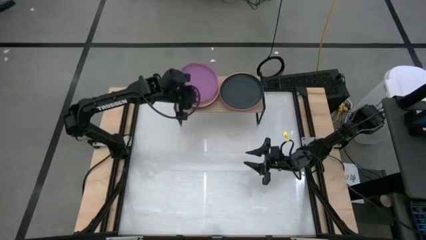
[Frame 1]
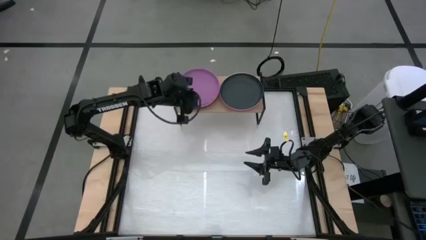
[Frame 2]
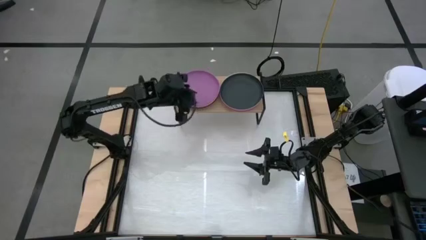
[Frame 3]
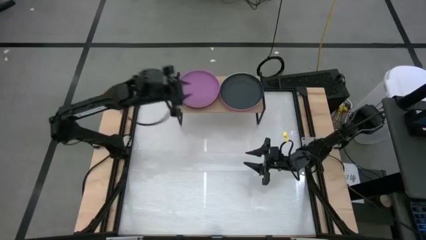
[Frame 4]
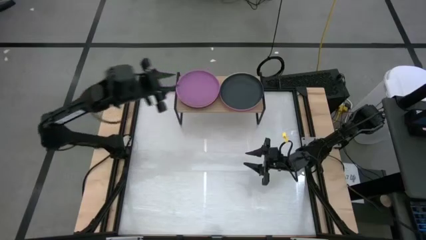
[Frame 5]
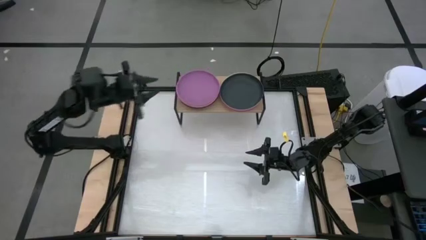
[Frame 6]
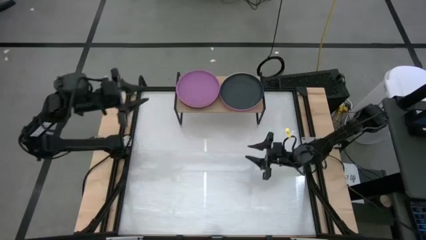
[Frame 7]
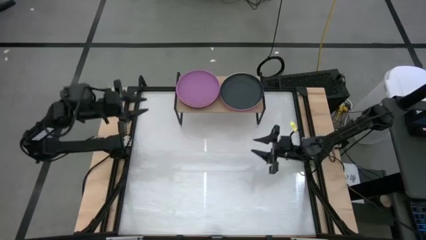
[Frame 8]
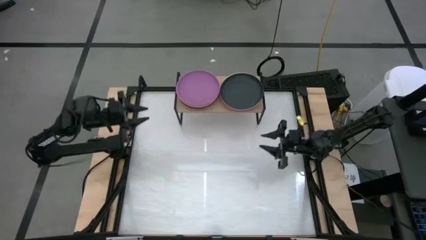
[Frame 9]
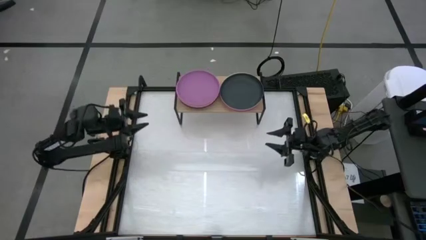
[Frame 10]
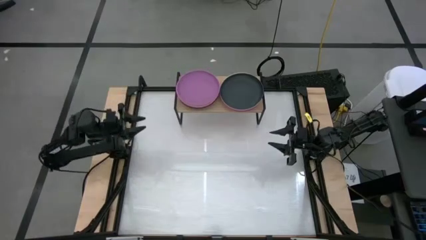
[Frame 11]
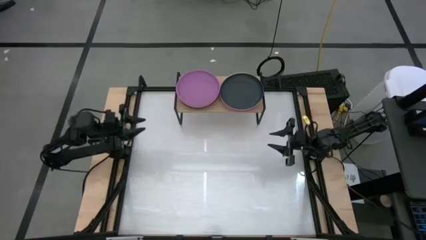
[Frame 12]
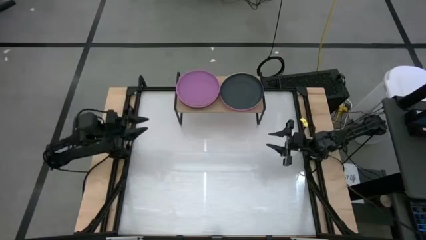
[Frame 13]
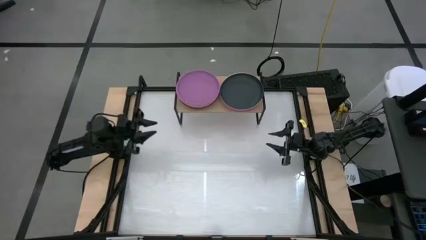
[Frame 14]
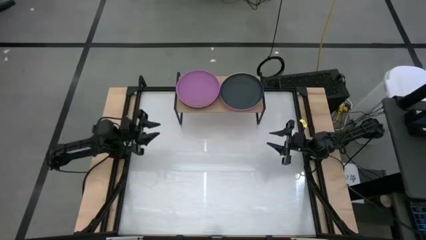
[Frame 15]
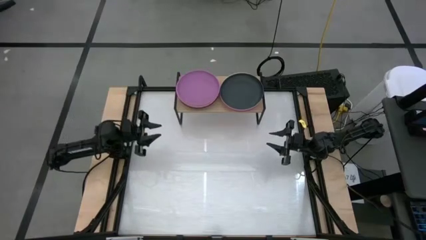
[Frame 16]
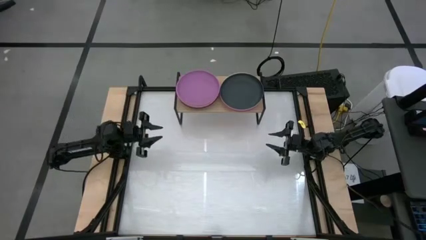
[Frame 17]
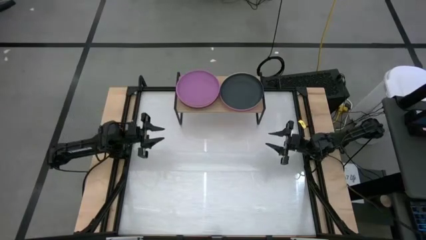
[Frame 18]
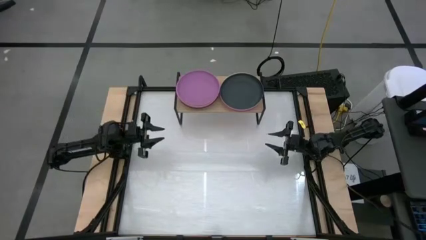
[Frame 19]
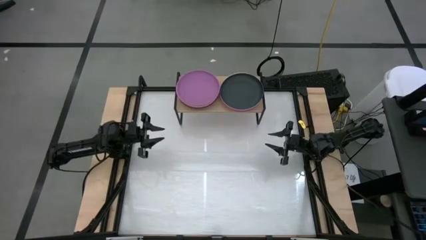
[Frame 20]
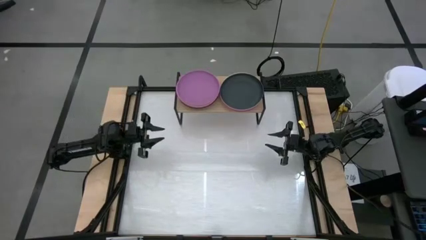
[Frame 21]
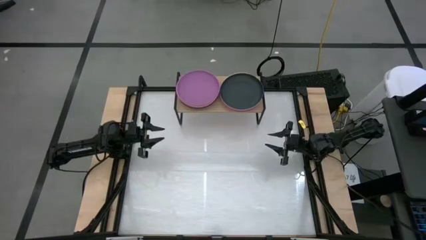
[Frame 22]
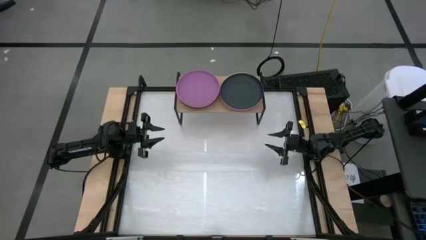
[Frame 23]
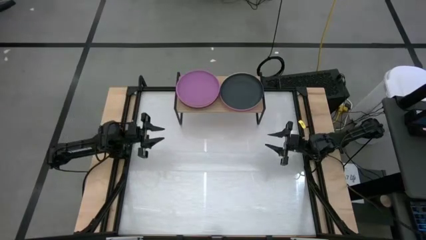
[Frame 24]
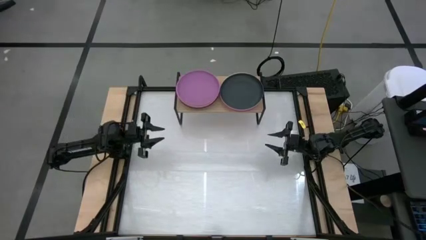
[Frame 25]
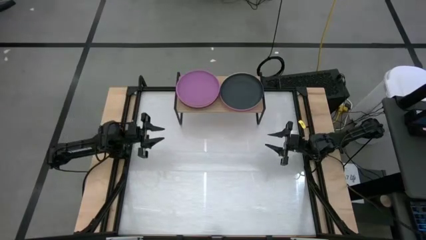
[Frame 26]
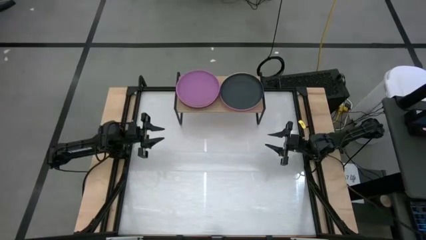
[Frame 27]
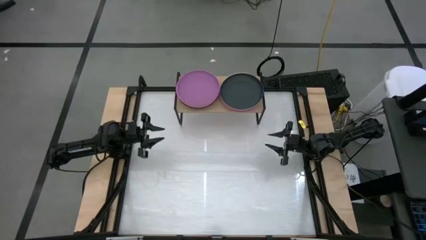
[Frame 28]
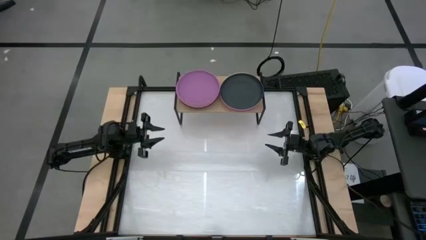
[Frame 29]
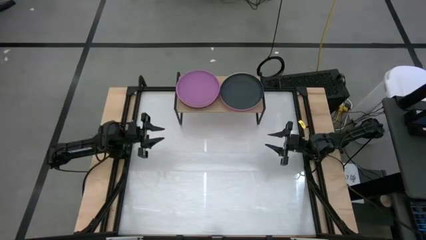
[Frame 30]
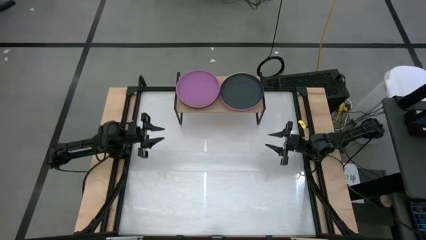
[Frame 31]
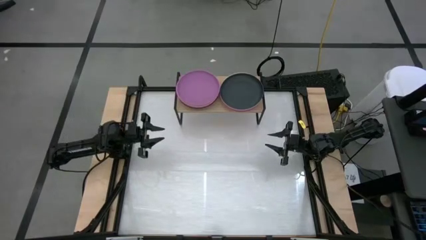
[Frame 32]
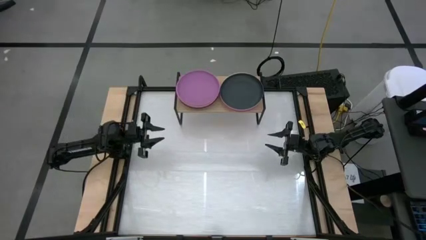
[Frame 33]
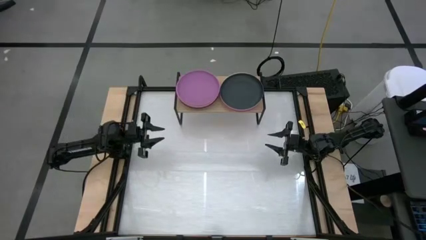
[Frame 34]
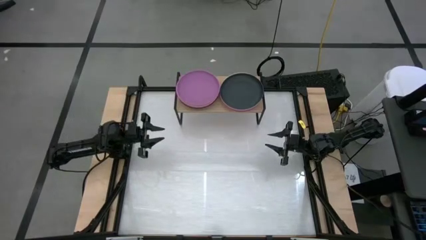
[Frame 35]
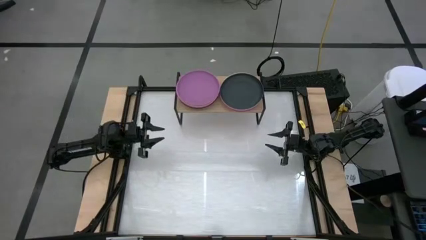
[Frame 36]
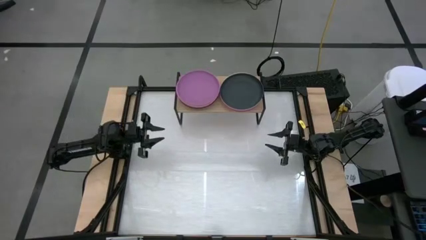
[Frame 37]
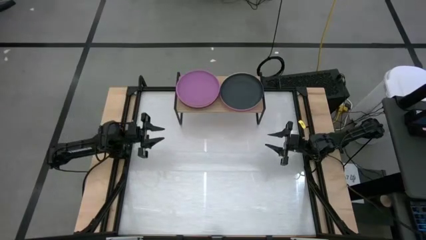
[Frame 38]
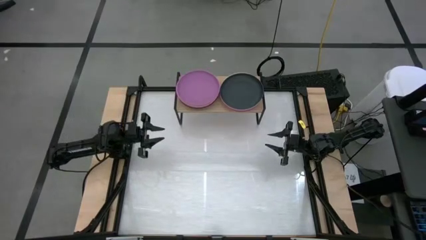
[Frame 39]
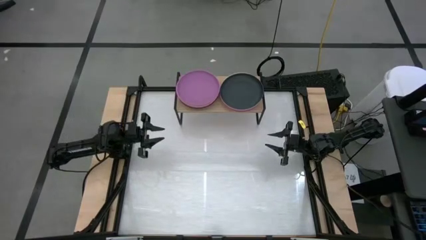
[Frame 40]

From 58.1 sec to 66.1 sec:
Task: Place and stack plates onto a shelf
Return to Home Position

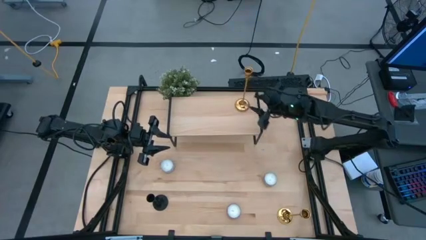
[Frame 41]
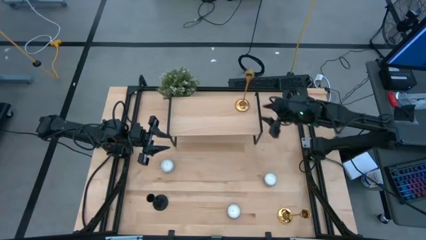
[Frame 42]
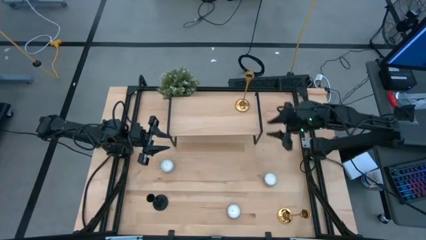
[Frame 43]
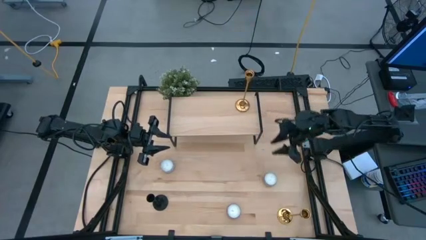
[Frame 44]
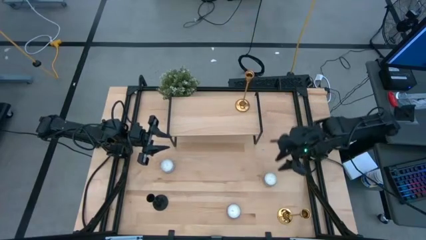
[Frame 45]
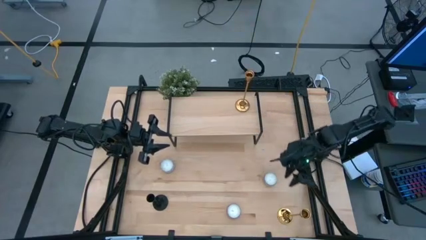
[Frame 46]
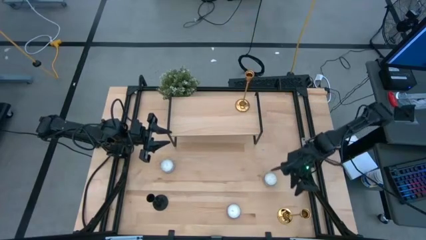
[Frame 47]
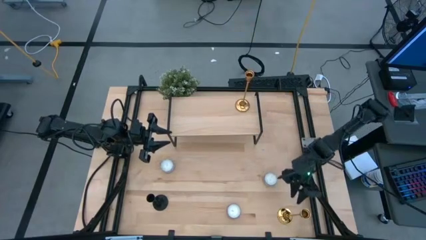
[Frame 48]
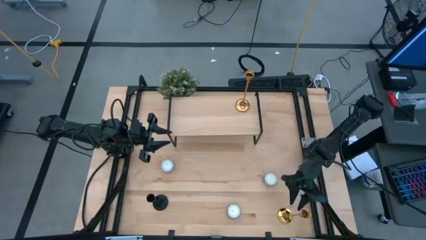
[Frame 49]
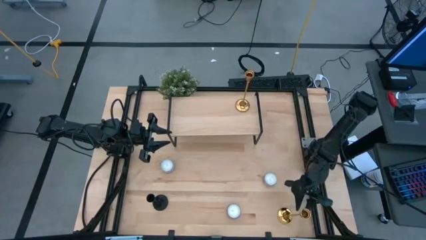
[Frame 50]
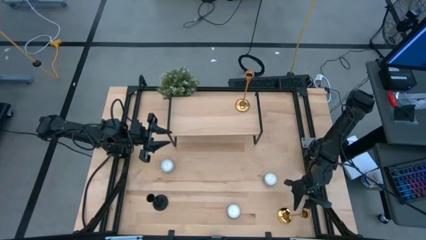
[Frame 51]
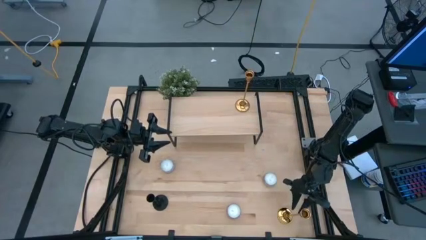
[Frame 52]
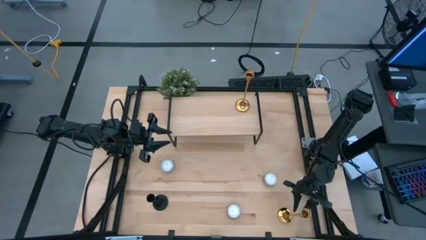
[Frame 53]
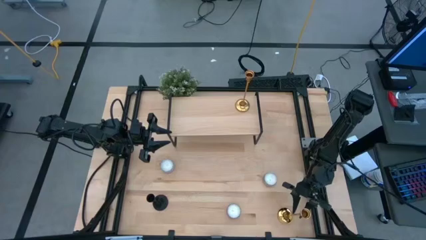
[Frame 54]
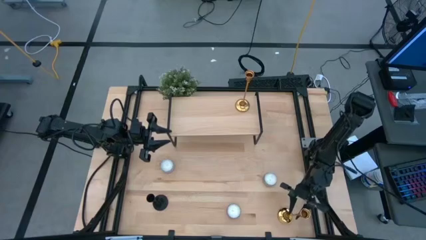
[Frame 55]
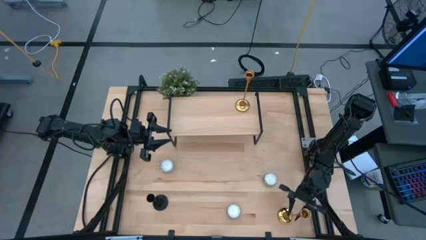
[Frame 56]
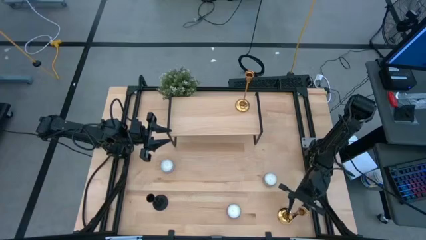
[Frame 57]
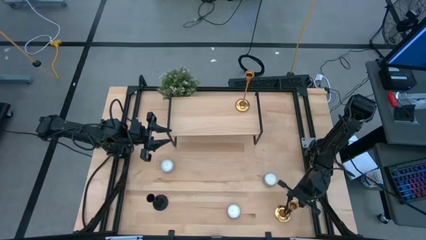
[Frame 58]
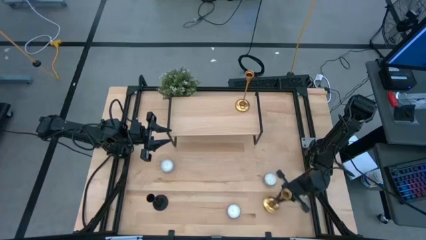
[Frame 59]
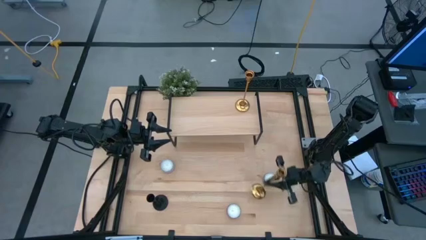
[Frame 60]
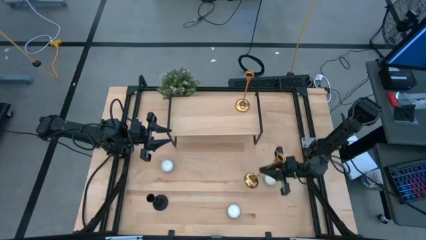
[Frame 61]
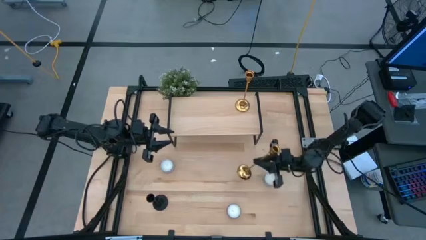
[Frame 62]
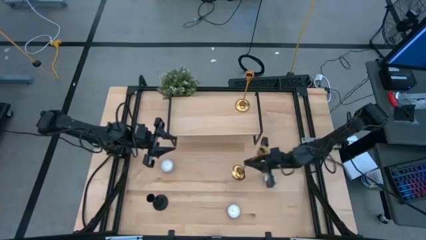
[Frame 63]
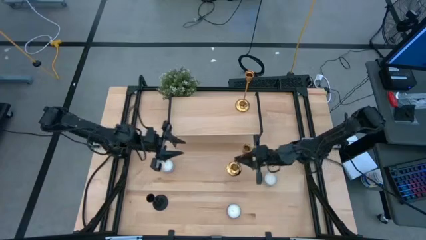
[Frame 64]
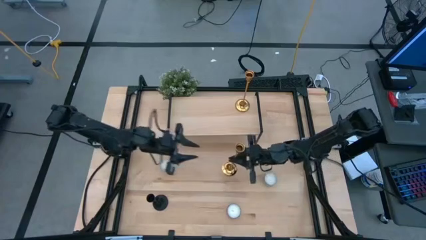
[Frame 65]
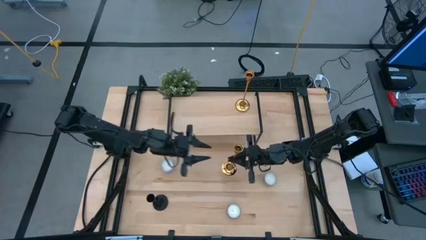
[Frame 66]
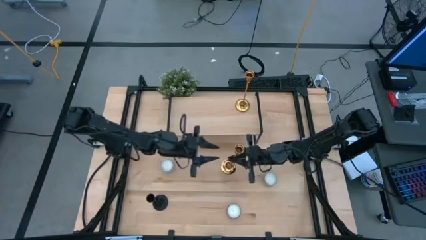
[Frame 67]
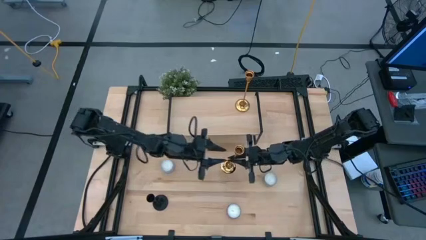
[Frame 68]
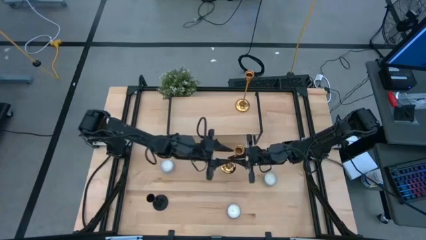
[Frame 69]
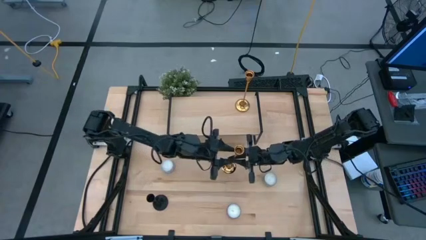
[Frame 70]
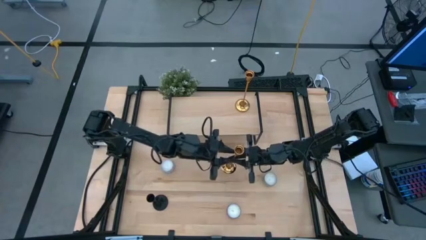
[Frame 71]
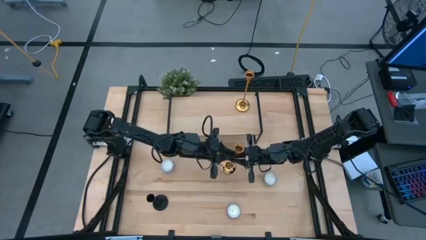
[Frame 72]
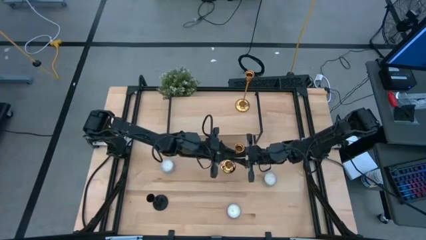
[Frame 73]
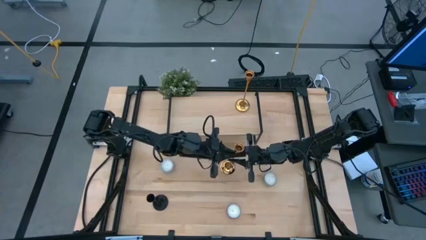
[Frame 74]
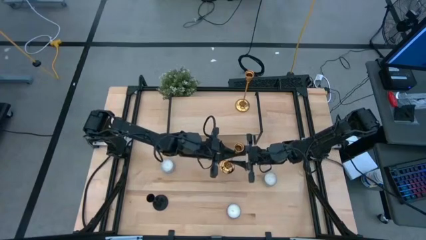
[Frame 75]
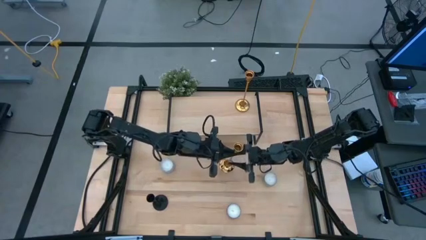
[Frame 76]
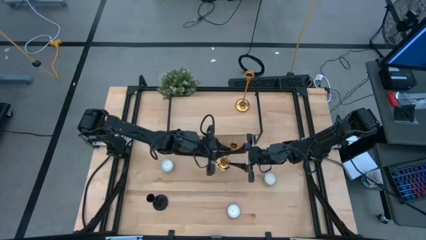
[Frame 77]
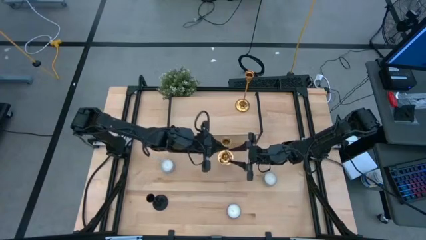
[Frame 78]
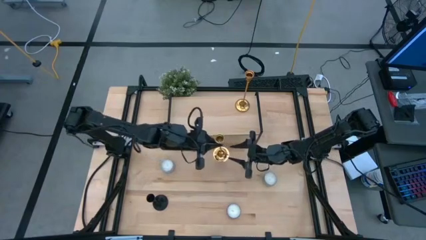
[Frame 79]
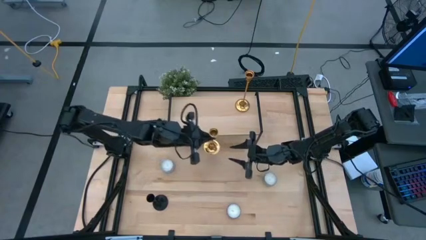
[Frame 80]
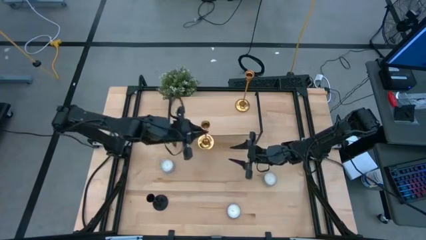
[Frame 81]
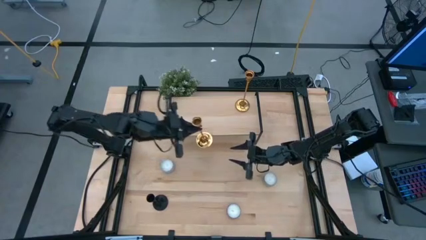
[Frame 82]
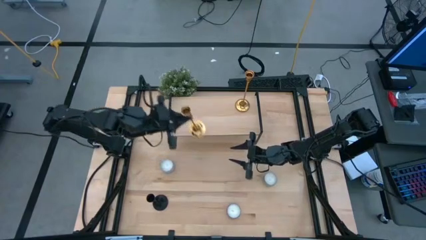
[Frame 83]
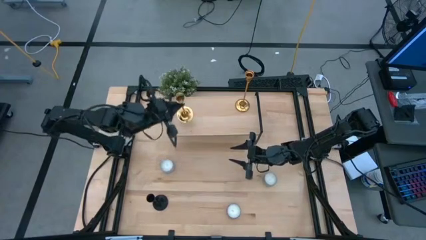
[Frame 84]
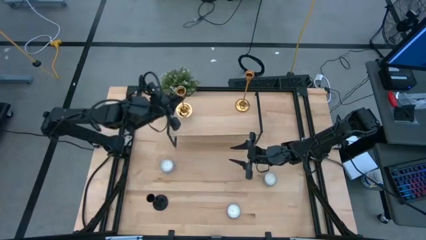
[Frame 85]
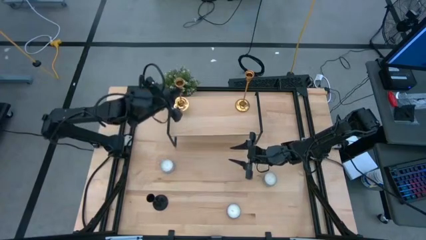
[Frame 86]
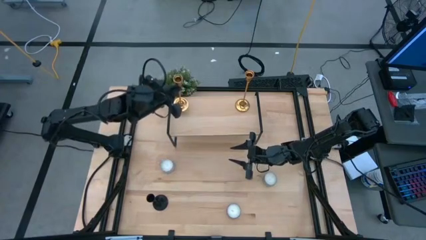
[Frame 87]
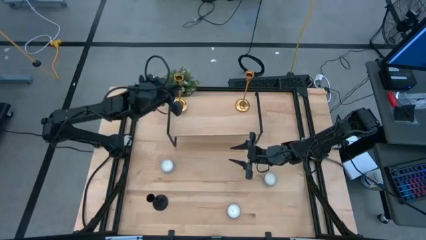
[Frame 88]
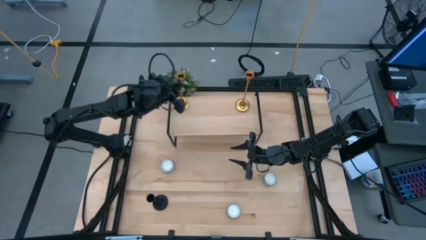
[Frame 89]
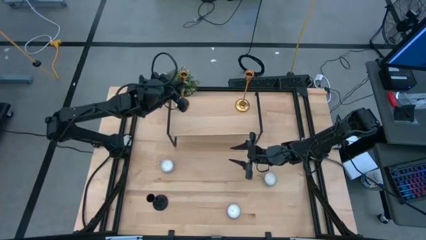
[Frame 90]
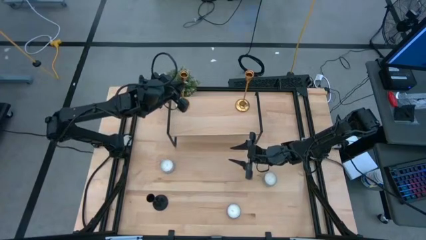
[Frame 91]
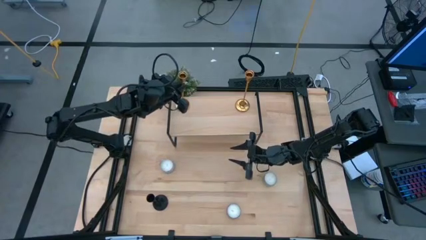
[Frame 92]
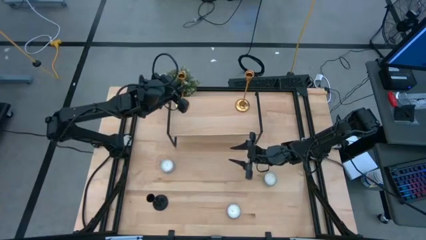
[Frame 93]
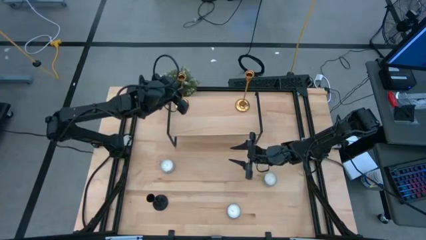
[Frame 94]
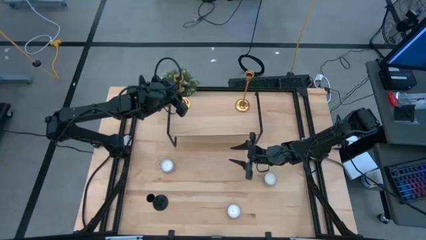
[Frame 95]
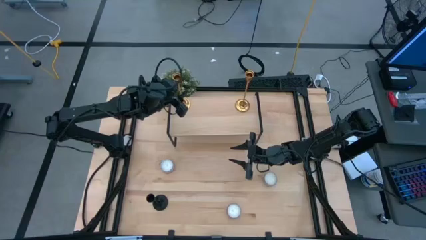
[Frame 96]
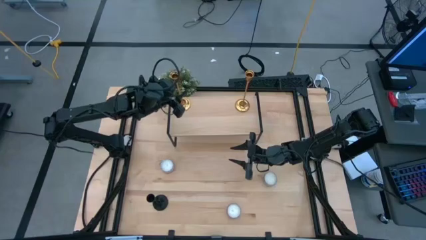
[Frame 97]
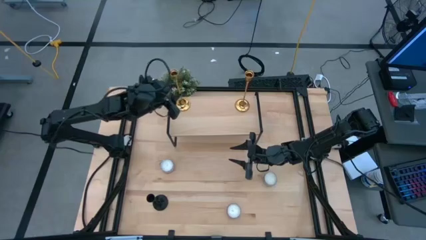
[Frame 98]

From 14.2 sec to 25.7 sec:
Task: Pick & Place candle stick holders
Put the gold candle holder on the shelf
